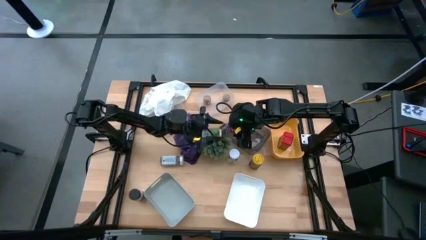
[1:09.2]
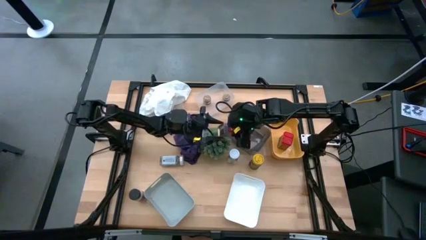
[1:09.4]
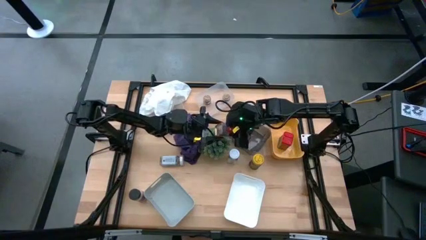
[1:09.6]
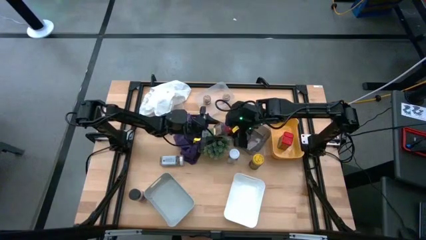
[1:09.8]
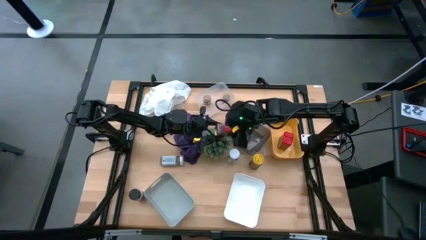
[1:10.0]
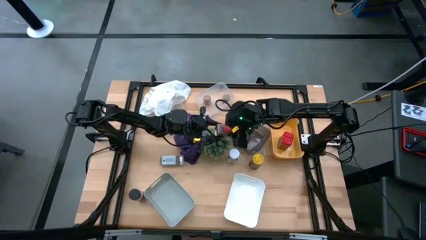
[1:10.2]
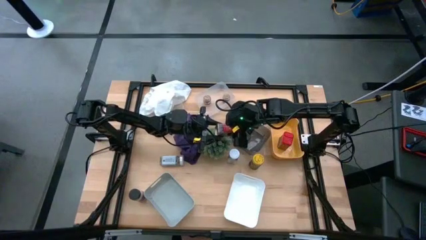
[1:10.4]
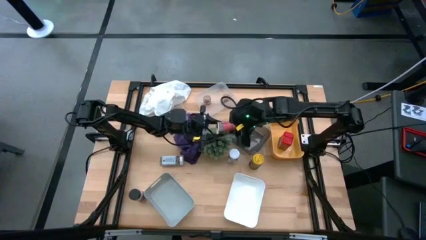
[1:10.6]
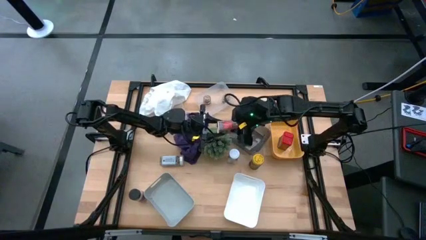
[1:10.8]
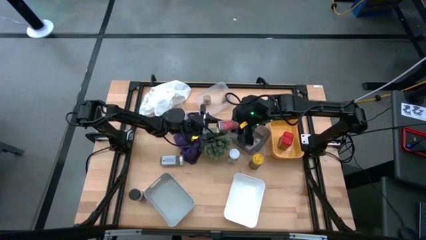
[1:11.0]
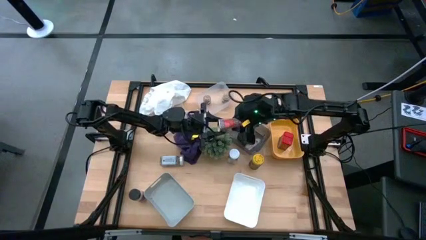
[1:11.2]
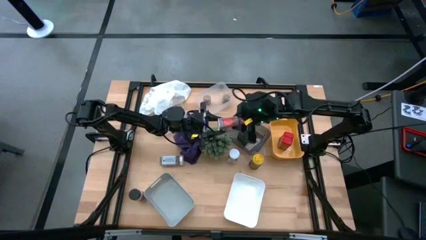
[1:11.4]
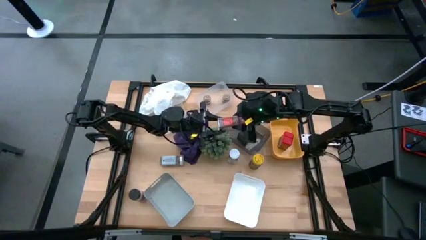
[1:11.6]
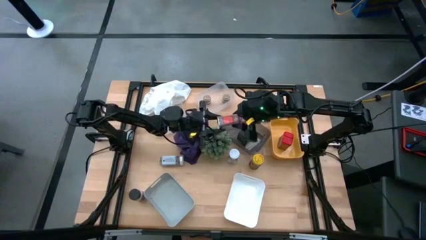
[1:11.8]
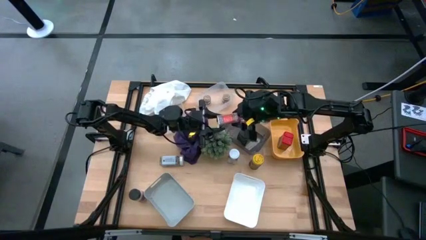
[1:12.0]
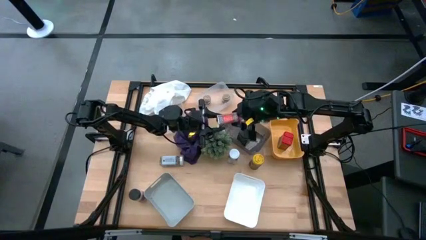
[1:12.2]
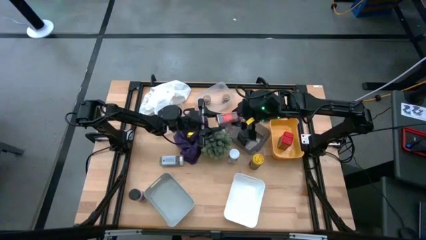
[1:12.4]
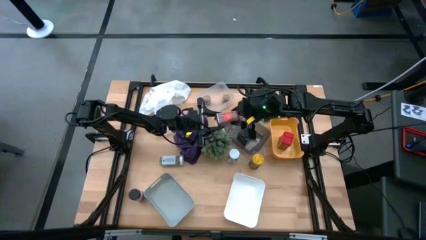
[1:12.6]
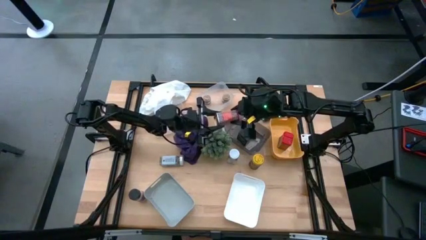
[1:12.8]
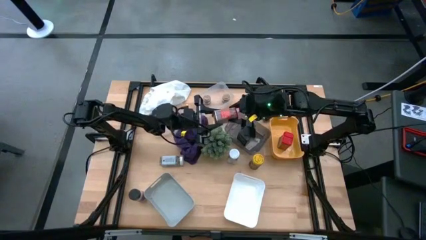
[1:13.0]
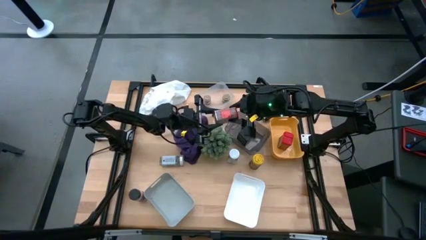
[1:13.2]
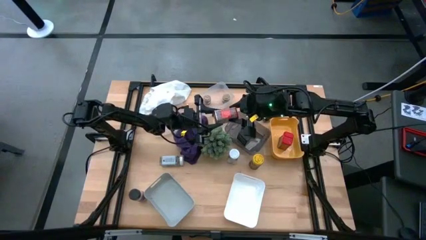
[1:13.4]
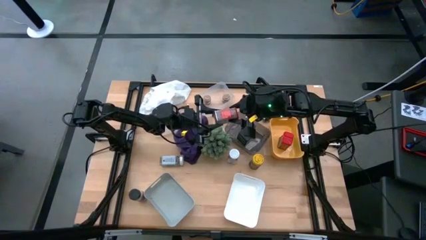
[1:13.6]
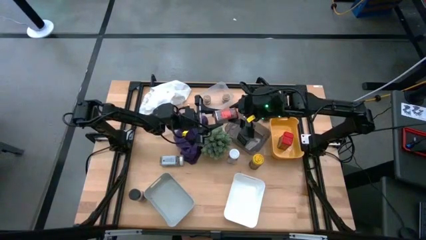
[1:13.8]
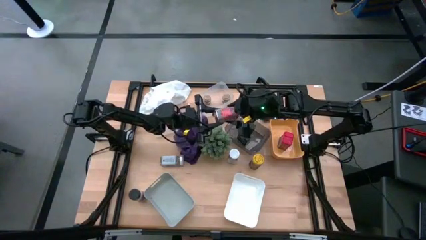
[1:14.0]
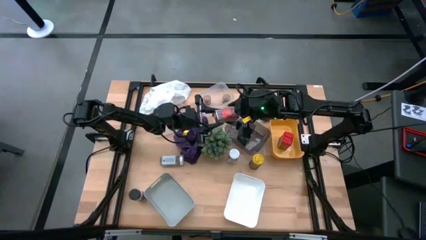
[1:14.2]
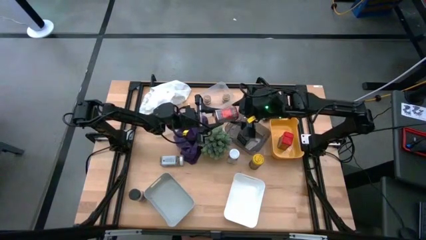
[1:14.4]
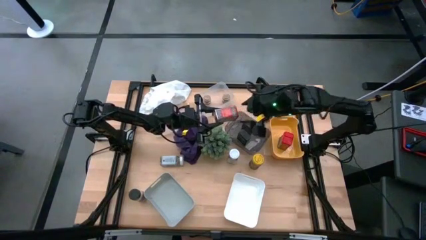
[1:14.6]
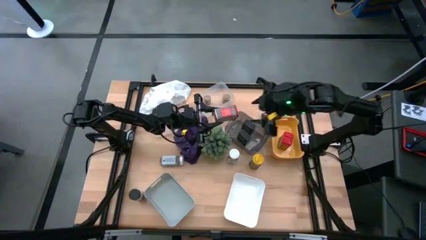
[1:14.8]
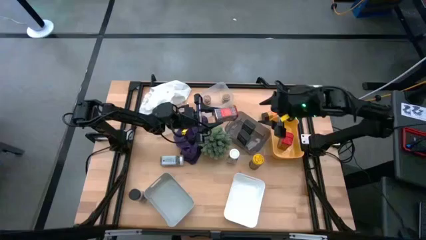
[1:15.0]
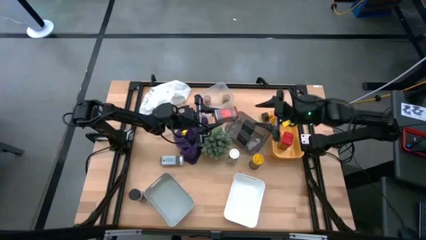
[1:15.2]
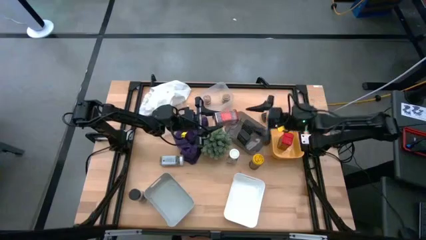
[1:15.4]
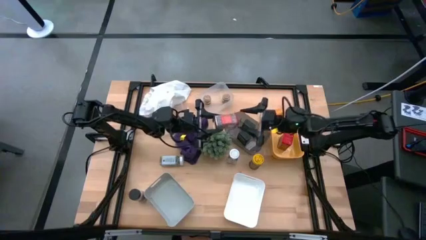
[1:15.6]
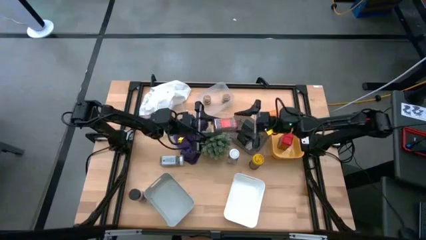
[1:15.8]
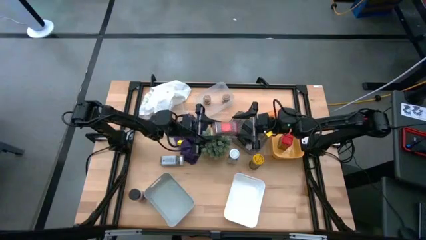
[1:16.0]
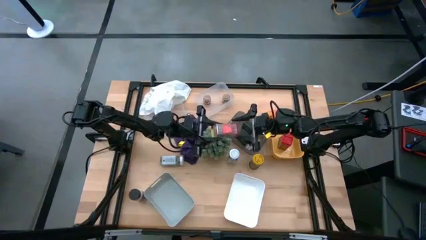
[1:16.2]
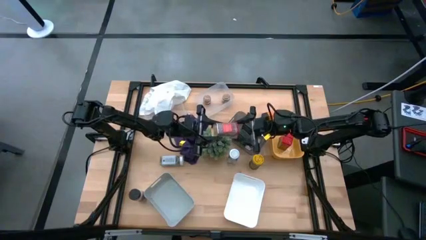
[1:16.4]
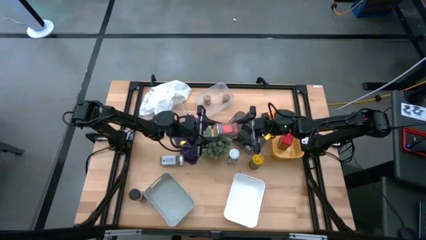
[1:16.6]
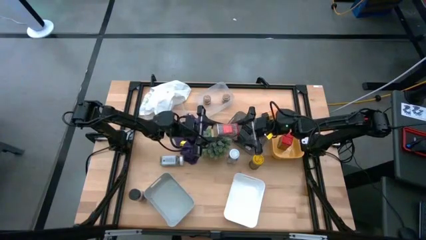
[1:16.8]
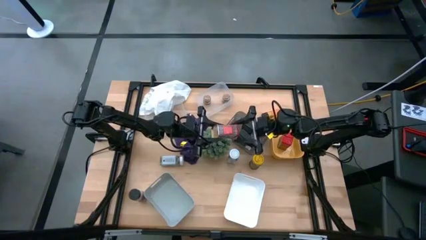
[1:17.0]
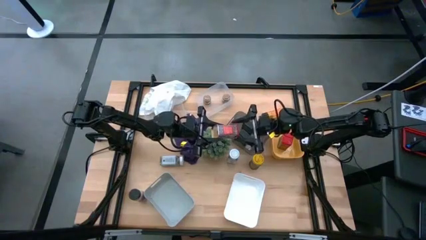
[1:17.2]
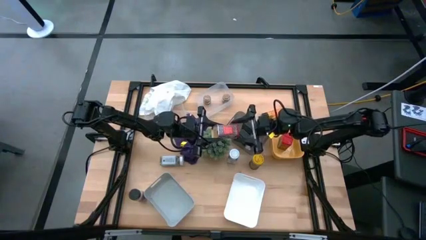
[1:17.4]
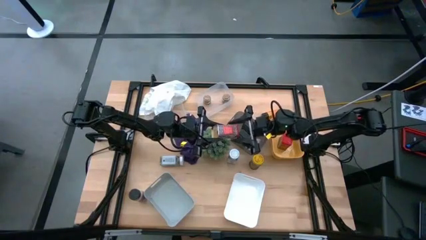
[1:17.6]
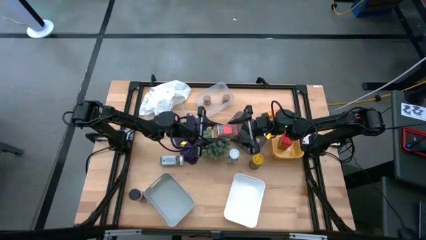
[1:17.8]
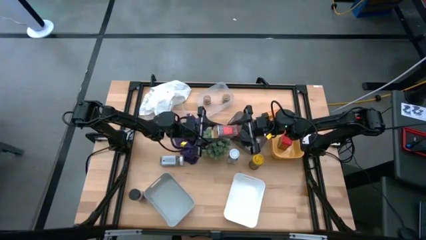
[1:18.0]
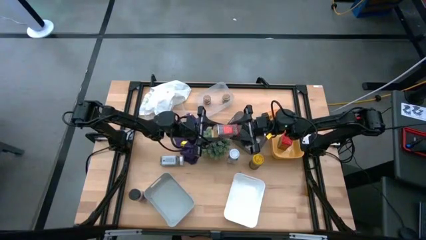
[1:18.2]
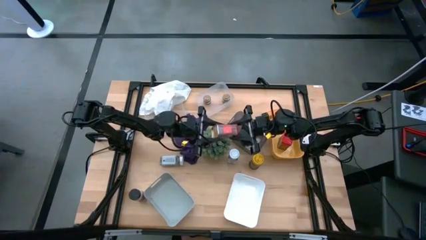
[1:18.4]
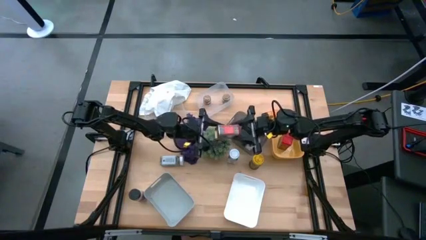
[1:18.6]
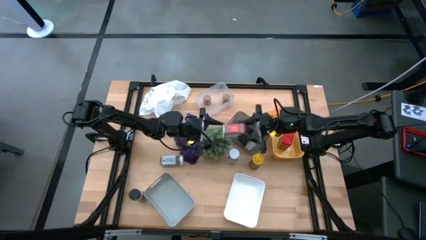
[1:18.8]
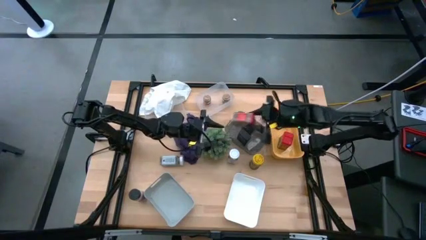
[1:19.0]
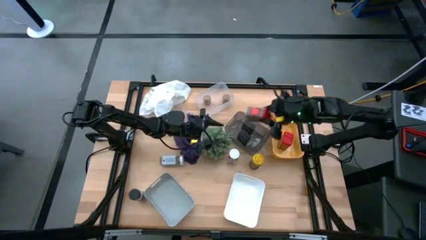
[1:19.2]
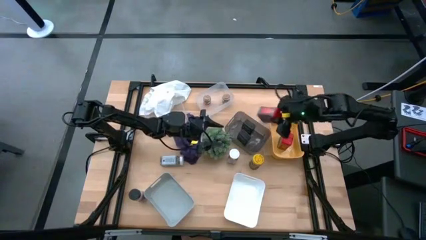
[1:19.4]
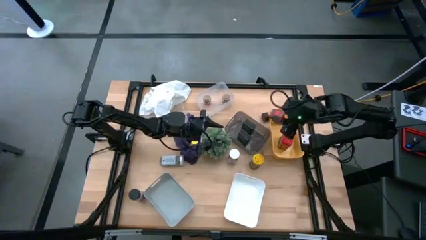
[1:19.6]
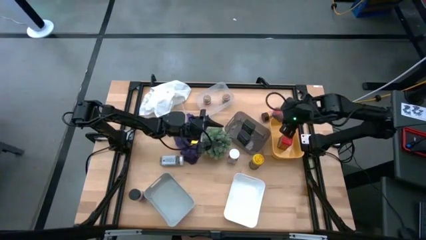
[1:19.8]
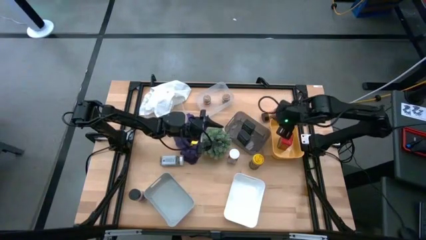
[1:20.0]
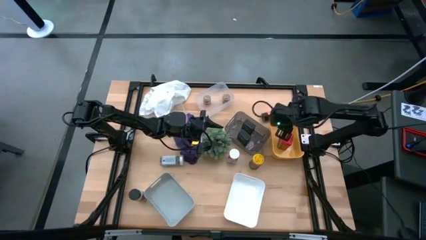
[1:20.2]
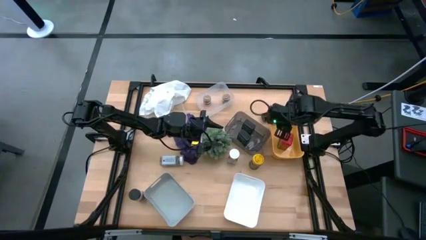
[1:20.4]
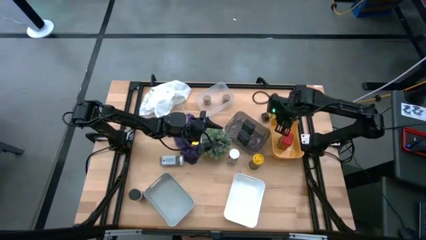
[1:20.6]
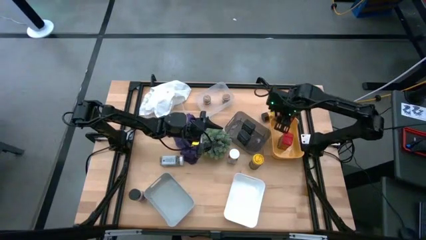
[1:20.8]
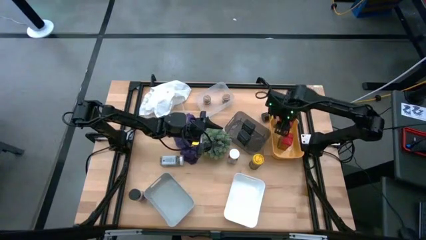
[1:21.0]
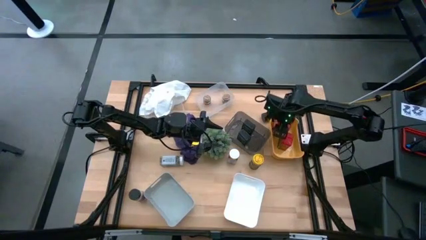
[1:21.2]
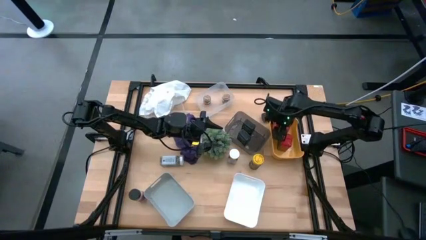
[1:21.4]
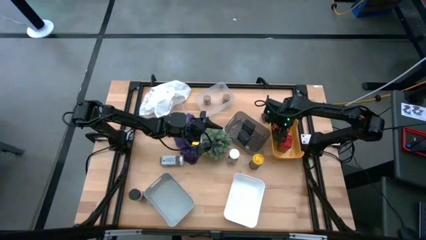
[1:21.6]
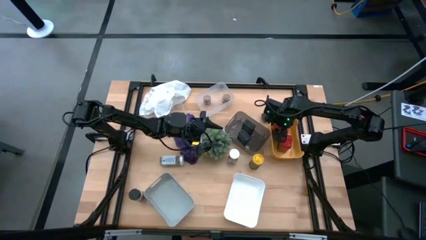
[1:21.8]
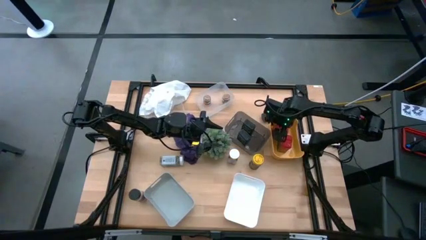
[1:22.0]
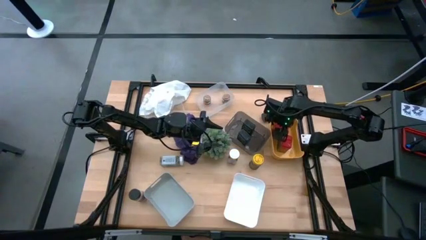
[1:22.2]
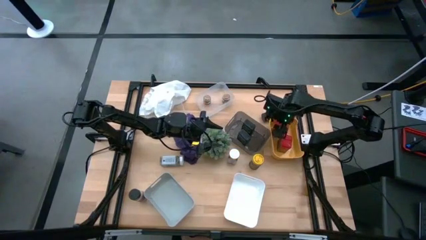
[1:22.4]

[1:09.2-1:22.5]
Task: Sort spices by type
Put the red seasoning can into the orange bin

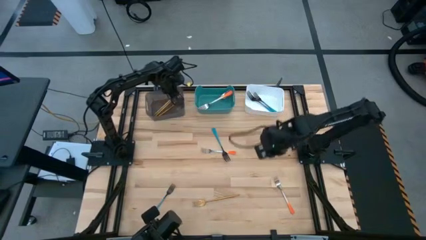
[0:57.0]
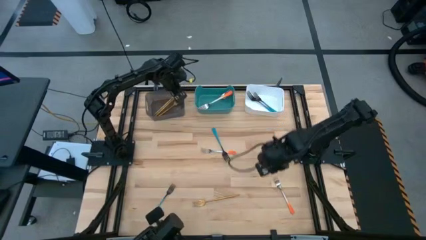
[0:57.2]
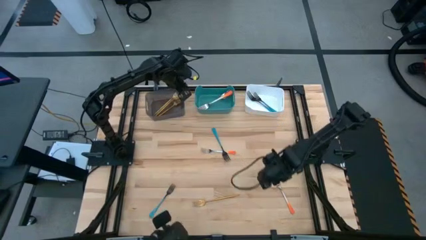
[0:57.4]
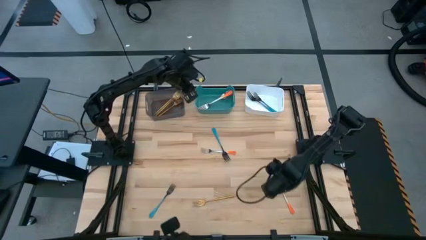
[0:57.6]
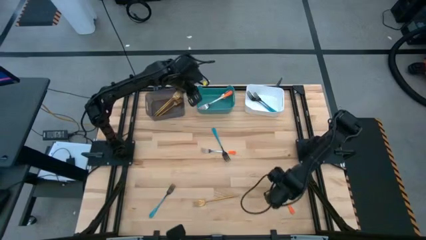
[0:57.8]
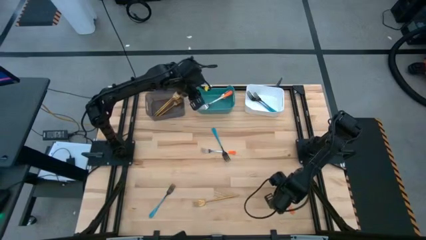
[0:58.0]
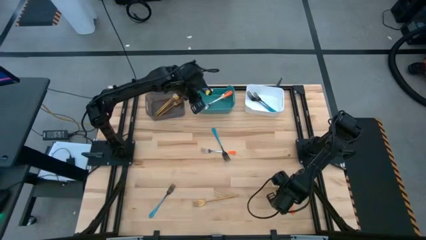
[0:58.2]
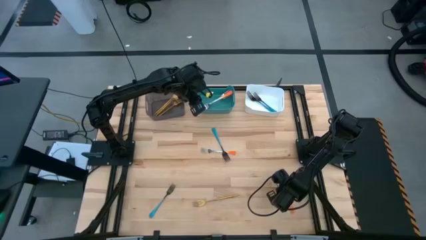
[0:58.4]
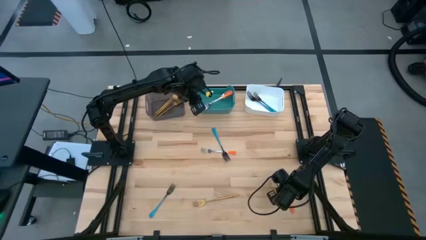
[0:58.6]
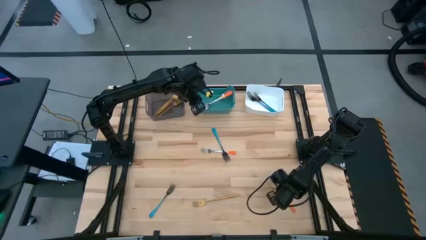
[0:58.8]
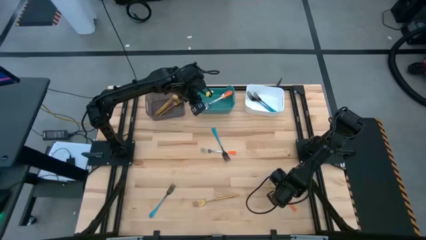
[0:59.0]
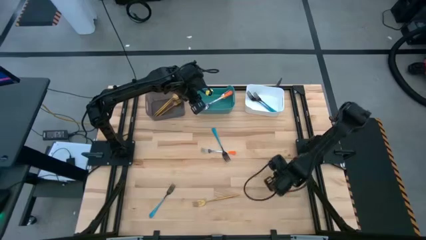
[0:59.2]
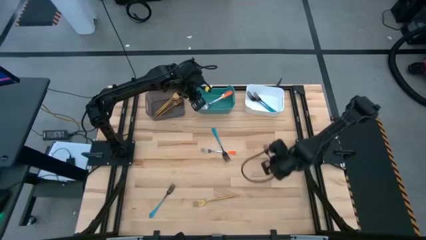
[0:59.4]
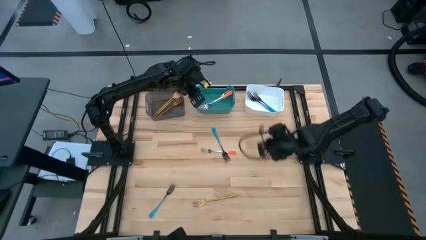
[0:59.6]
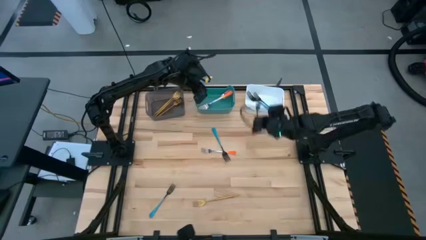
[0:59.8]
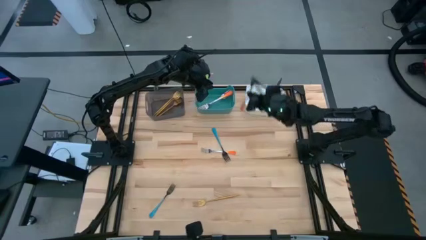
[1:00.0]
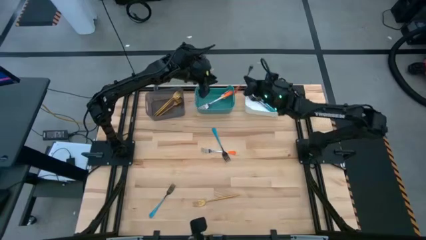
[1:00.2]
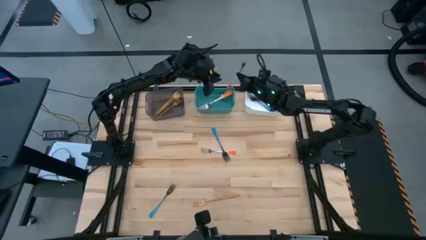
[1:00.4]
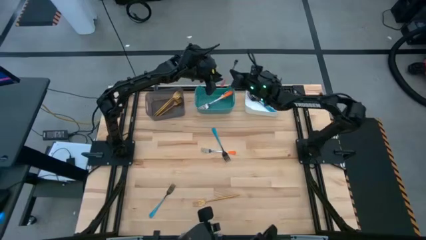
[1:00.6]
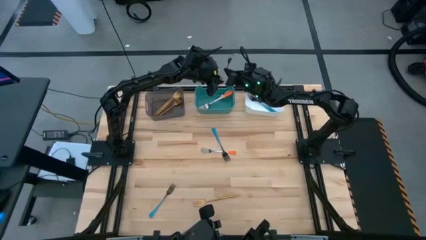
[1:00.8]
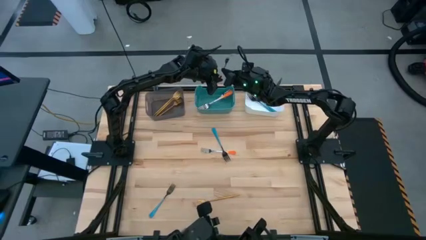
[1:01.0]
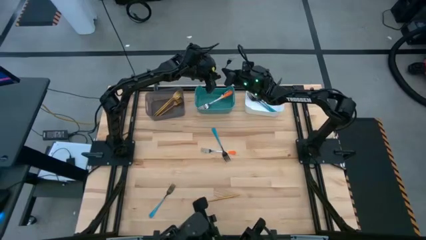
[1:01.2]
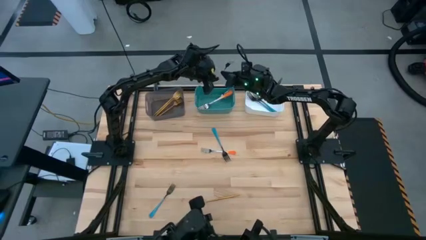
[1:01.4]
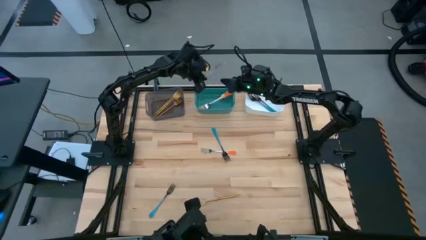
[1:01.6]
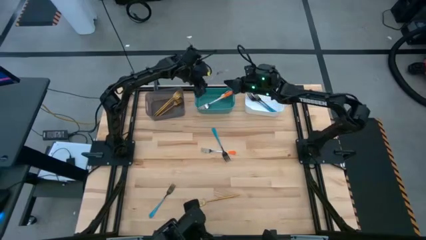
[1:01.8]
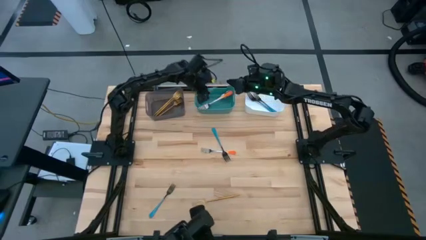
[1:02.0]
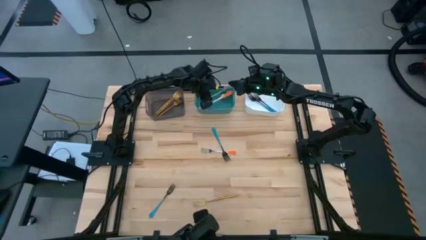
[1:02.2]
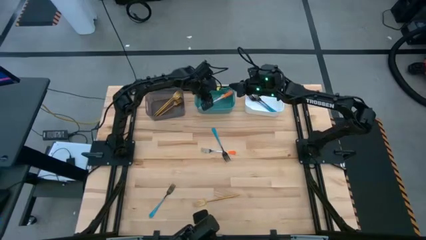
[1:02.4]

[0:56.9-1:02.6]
Task: Sort silverware by color (type)
Put the orange fork into the green bin
